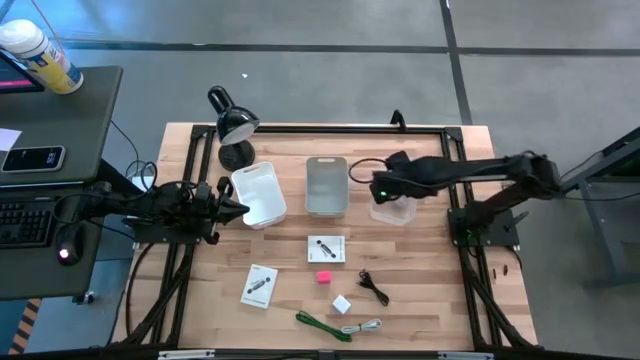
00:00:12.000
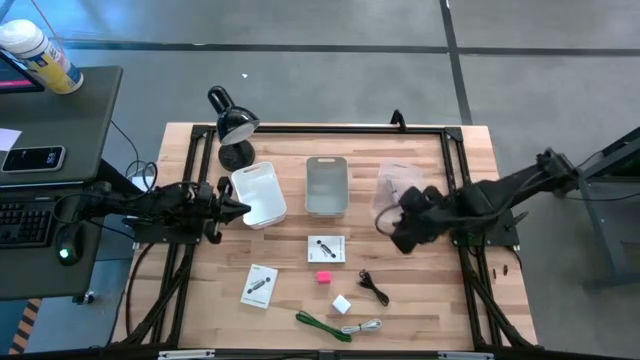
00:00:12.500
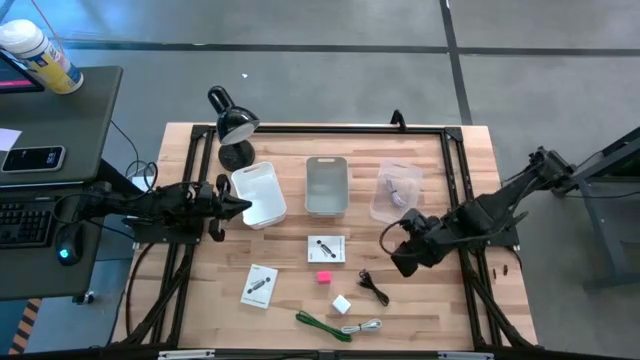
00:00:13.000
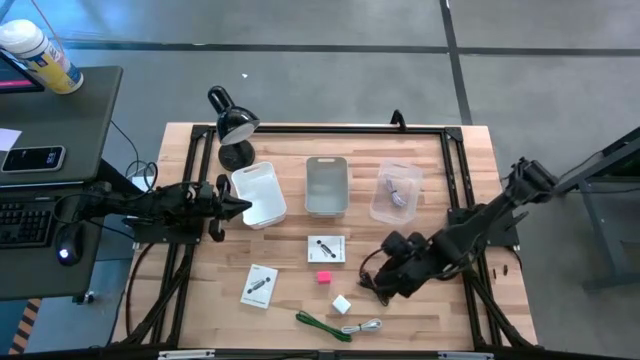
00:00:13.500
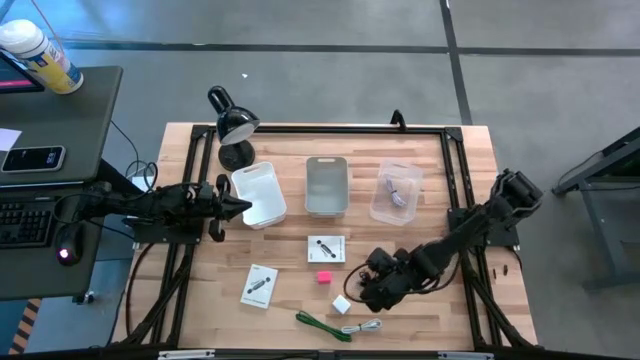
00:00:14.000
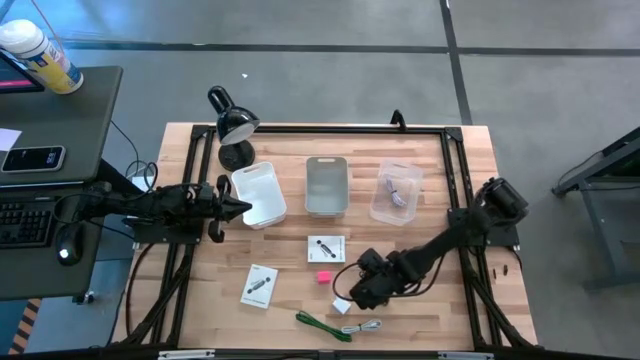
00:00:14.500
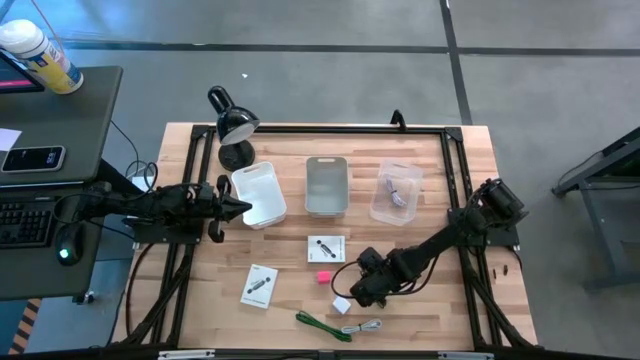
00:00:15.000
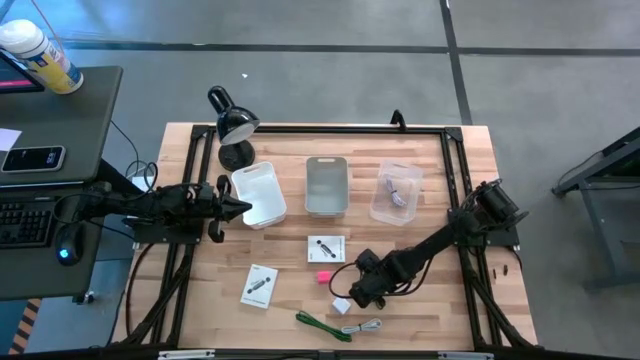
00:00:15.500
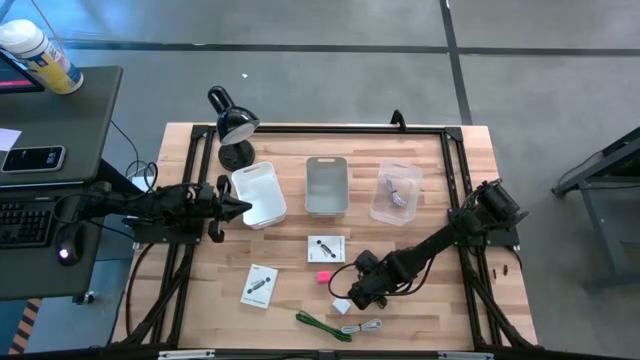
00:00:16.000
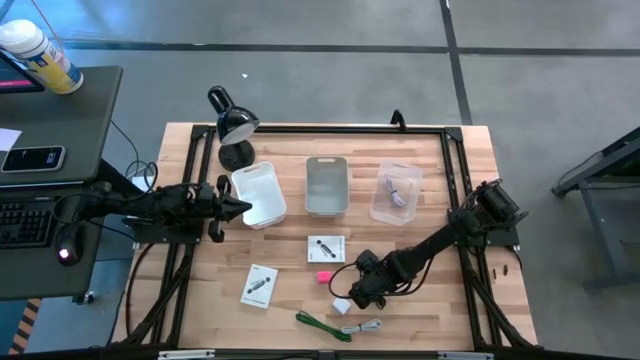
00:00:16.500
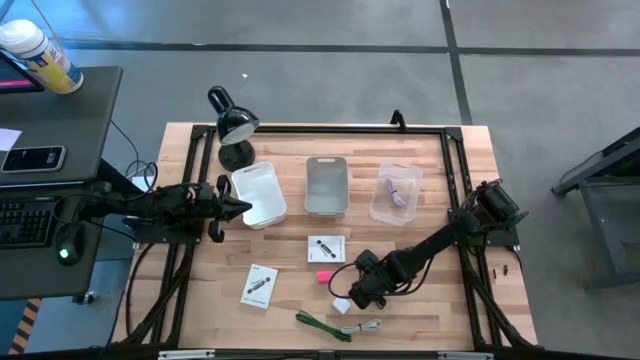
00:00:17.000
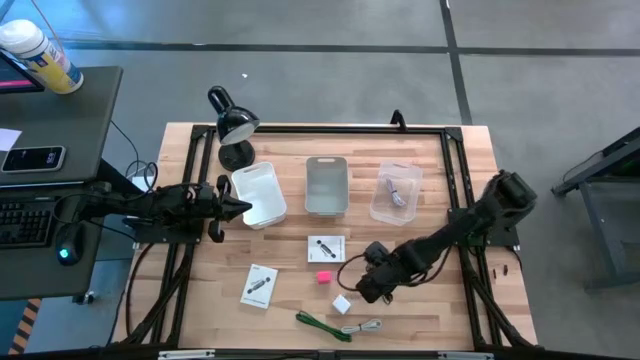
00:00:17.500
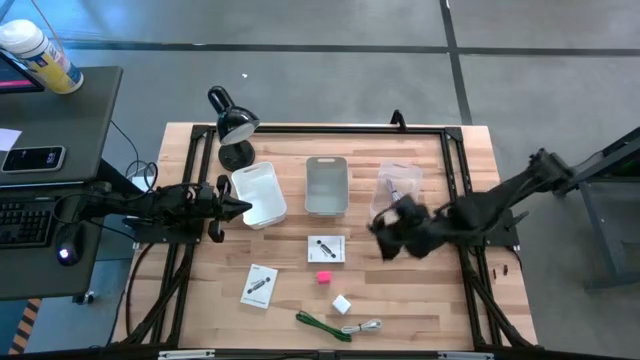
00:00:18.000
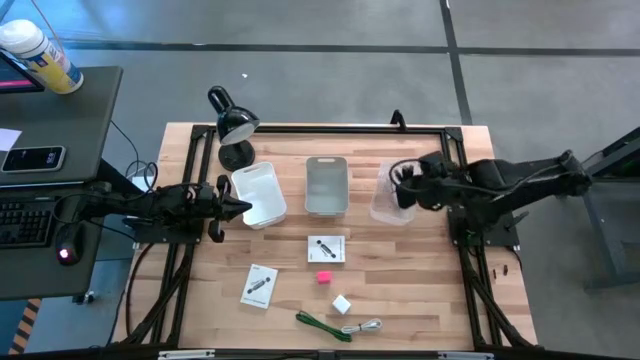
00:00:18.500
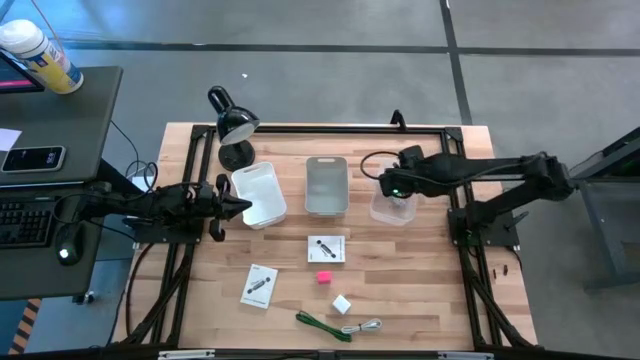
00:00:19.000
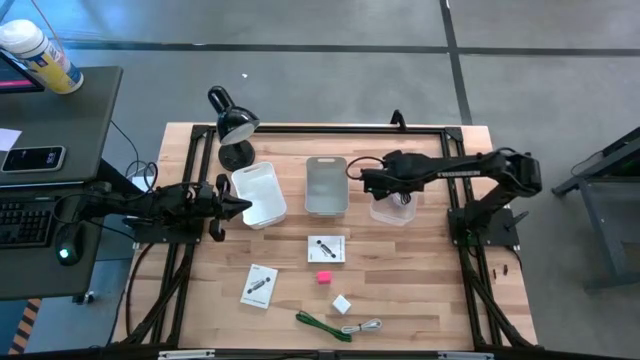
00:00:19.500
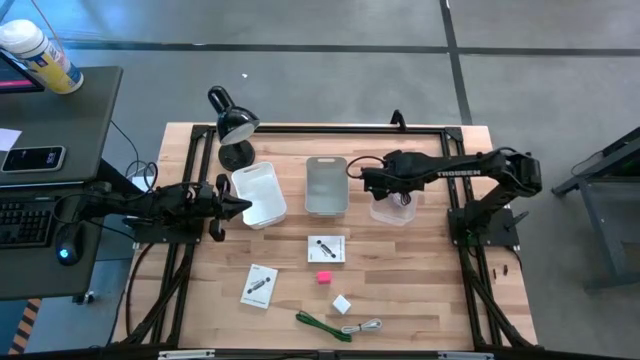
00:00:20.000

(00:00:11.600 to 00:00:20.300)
Task: Pick and place items into bin
Put the black charger cable into the transparent bin

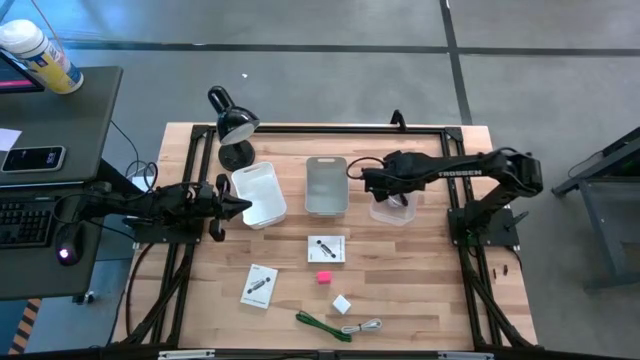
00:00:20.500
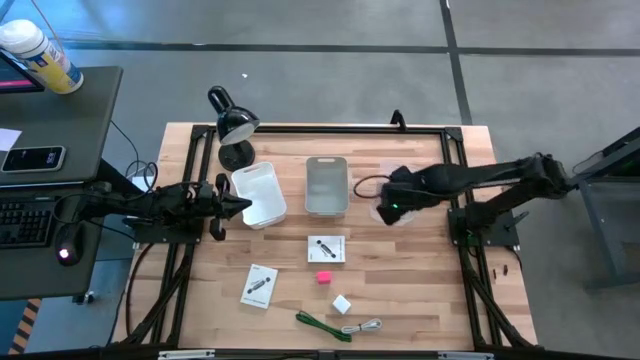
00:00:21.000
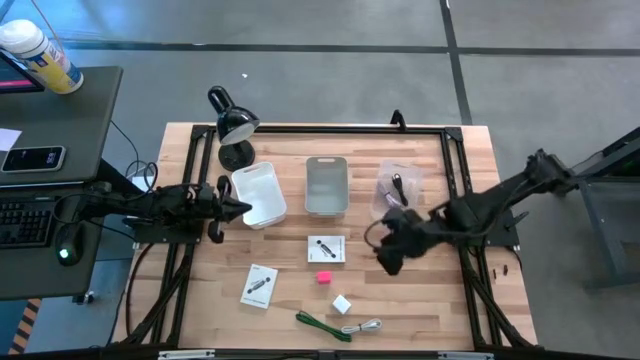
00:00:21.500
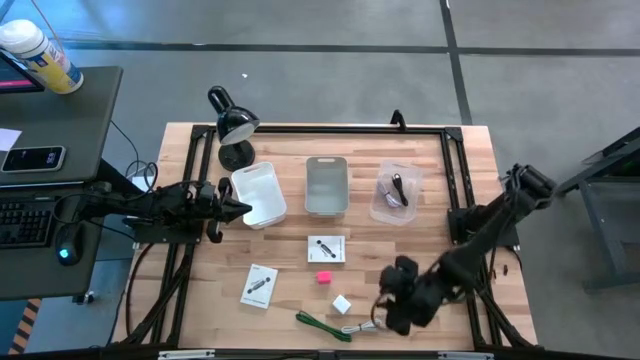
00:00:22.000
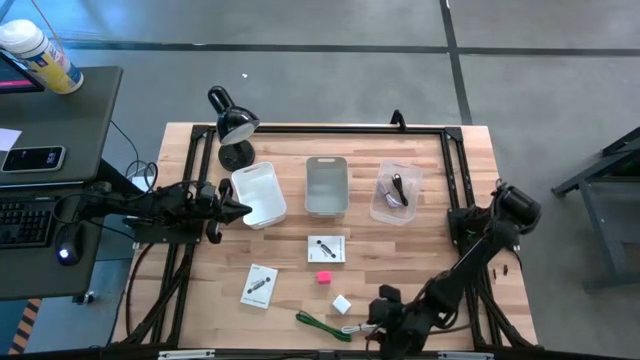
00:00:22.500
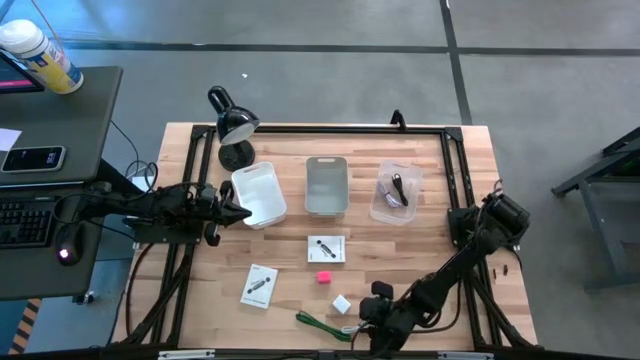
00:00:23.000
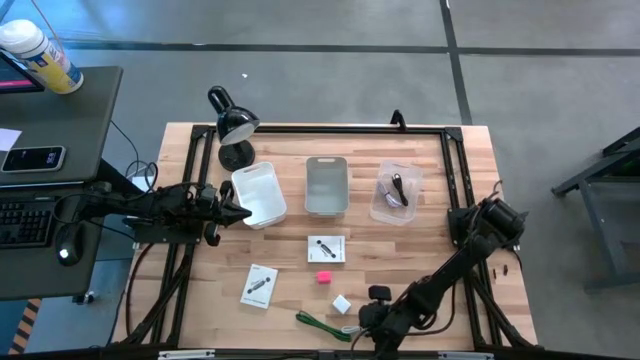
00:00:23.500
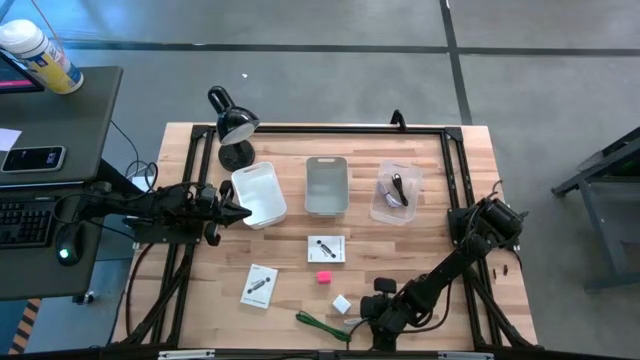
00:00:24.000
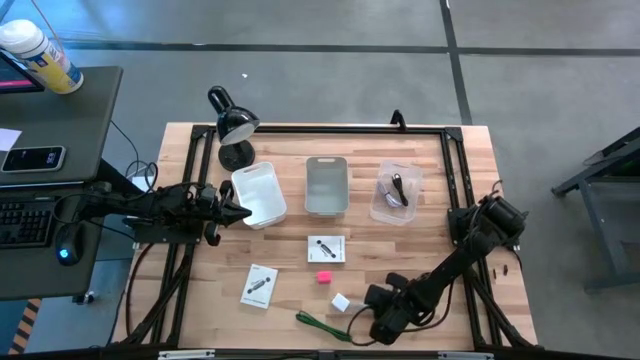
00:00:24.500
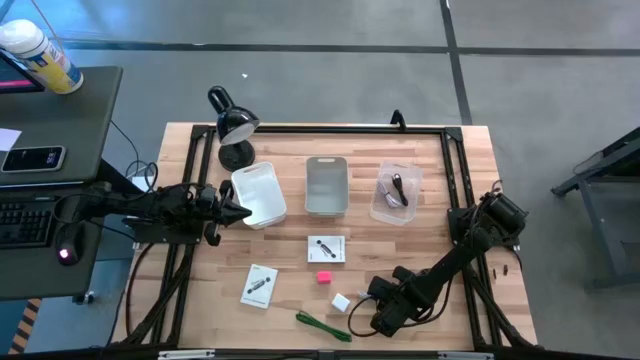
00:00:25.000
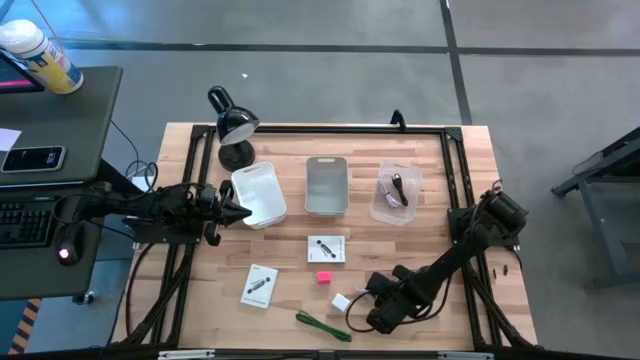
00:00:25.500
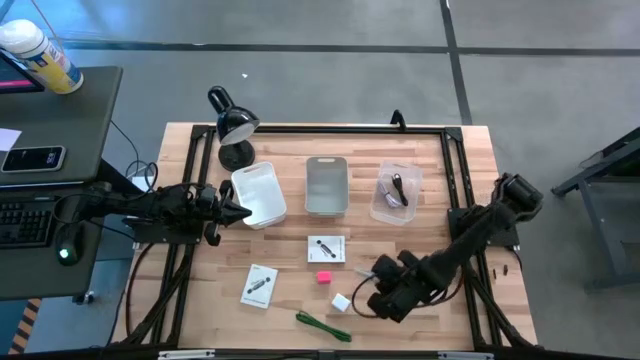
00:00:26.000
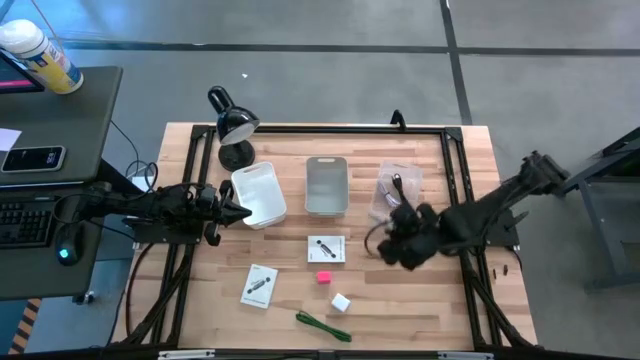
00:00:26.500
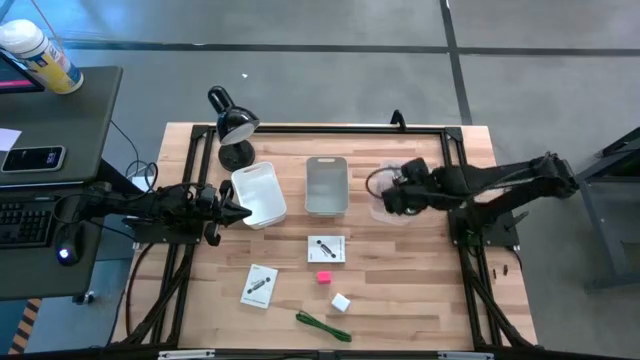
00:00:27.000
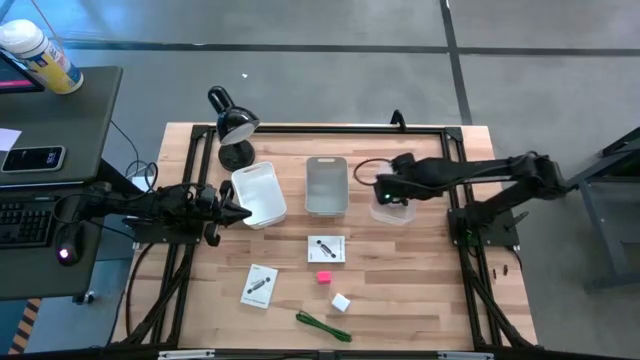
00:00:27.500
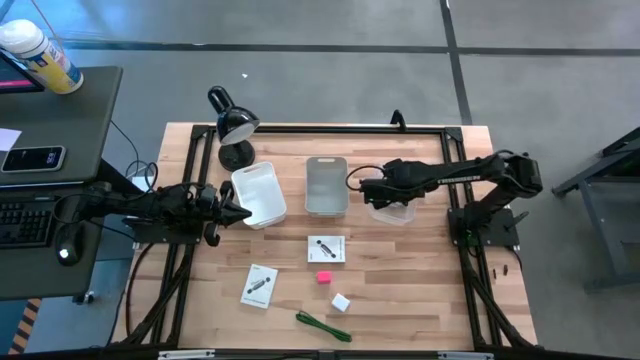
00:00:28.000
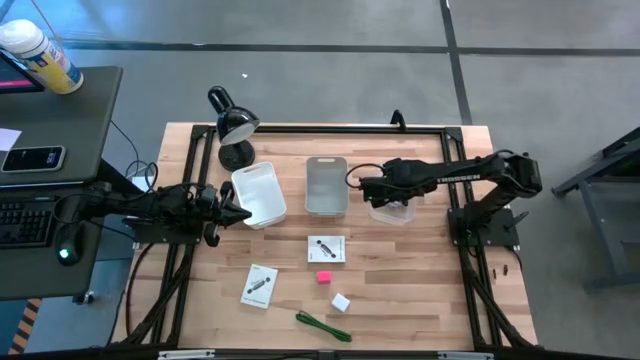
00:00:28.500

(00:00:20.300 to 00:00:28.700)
Put the white charger cable into the transparent bin

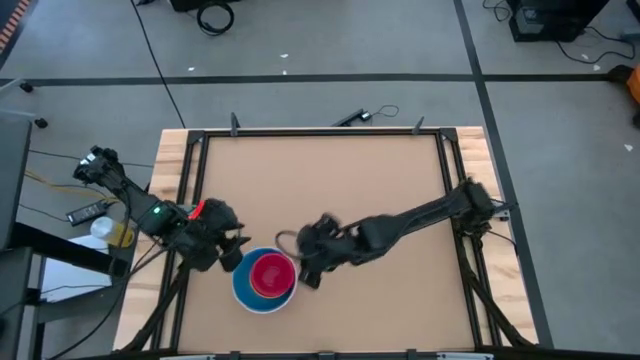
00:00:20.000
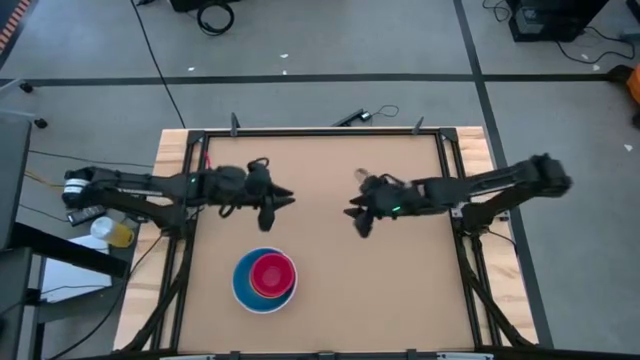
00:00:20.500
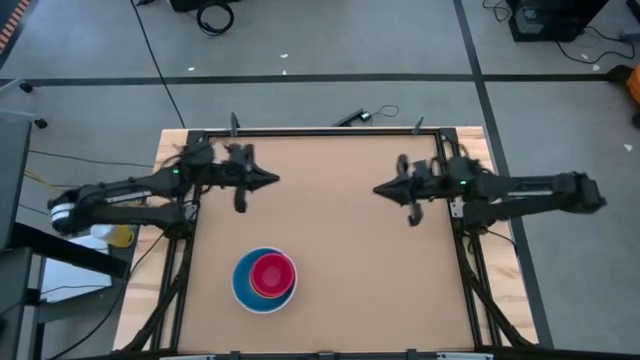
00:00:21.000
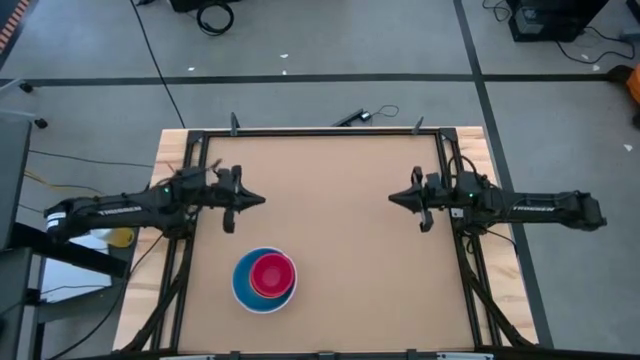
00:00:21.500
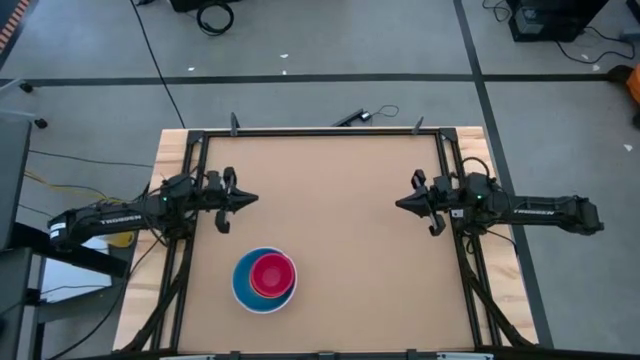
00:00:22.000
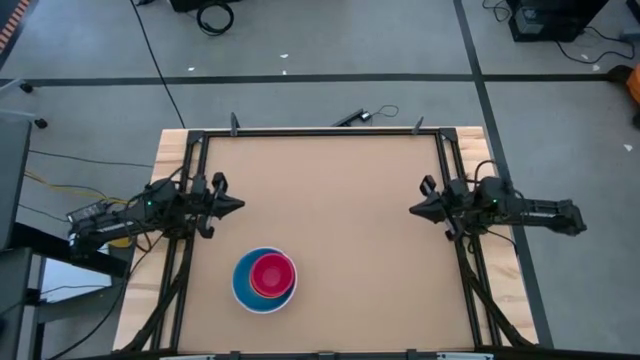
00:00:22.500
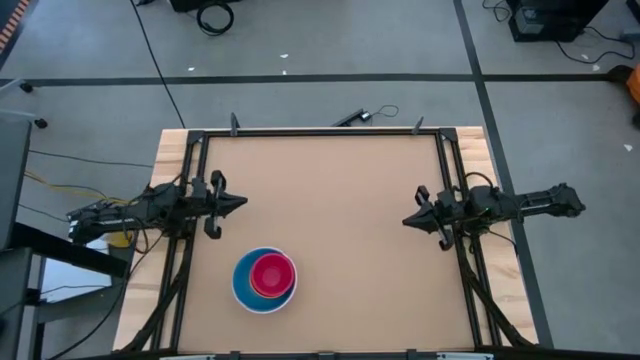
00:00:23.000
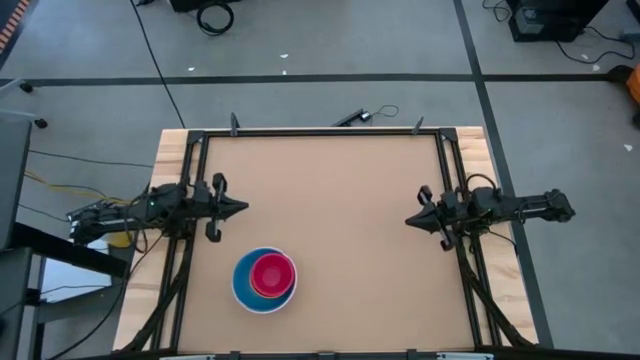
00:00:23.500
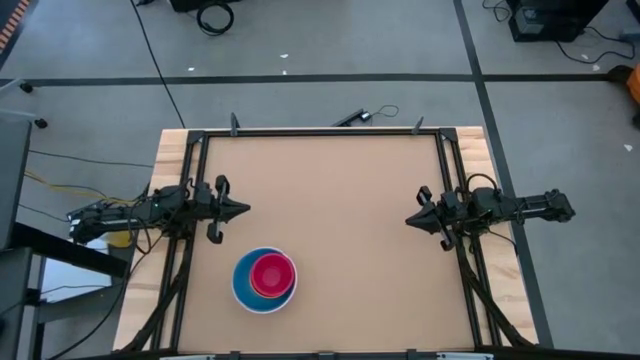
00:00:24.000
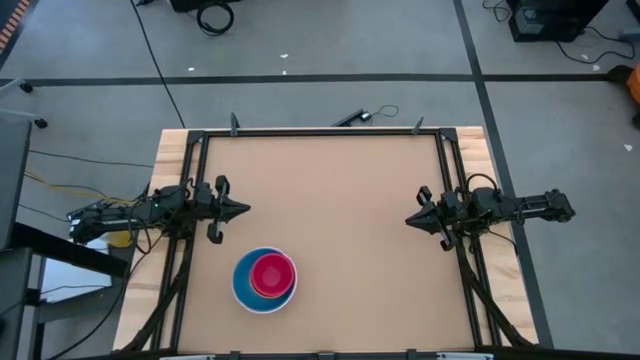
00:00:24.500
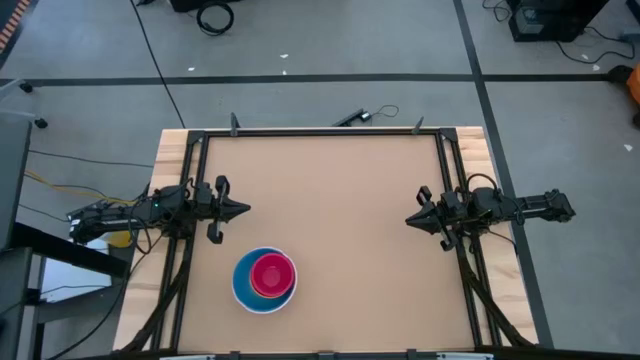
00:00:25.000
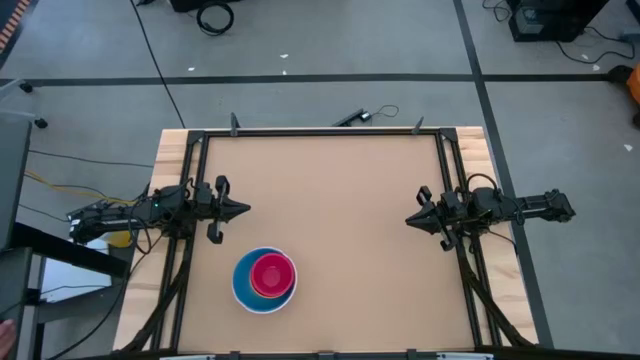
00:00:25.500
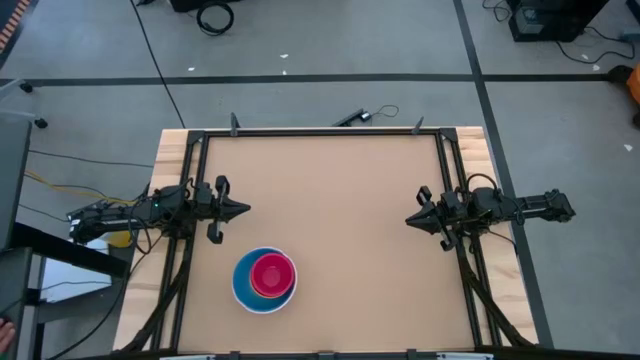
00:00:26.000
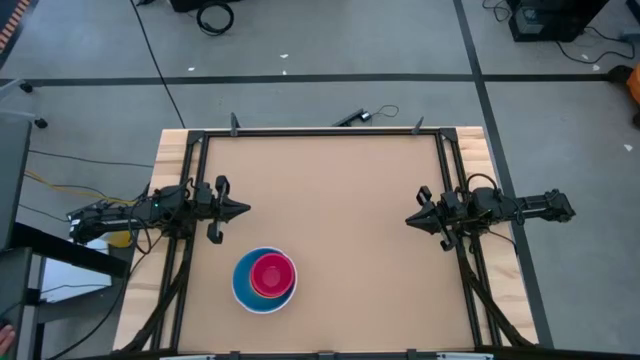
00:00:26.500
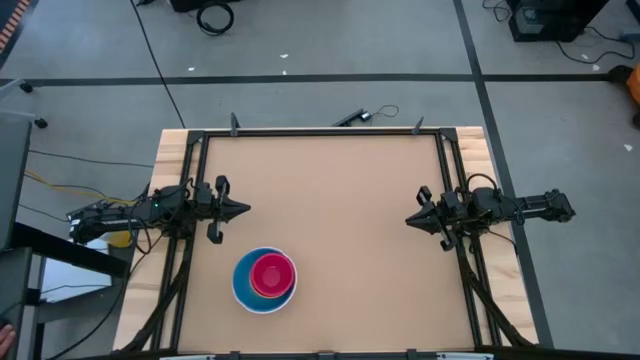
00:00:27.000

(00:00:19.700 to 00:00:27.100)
Task: Nest bowls inside each other by size order
Return to Home Position
